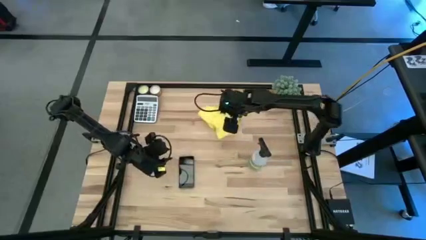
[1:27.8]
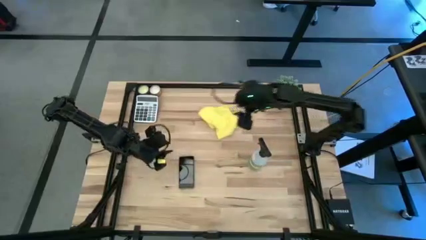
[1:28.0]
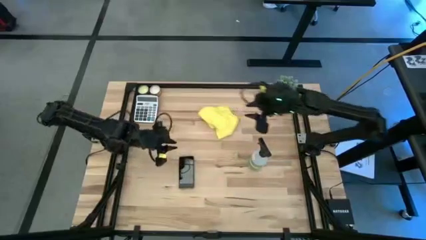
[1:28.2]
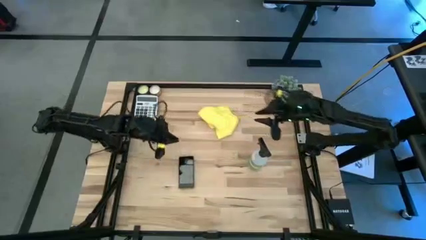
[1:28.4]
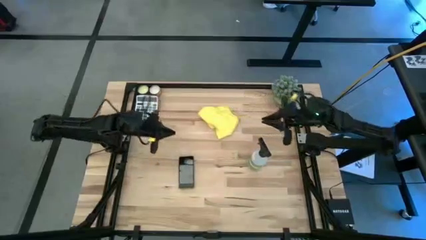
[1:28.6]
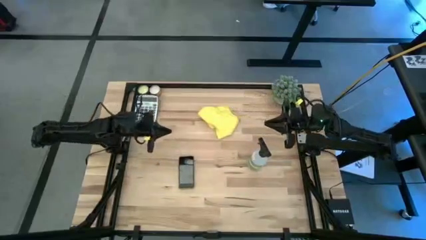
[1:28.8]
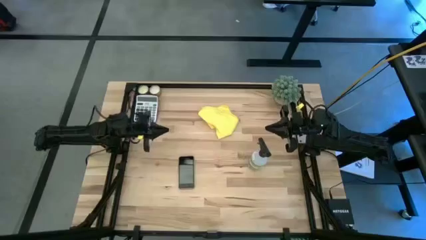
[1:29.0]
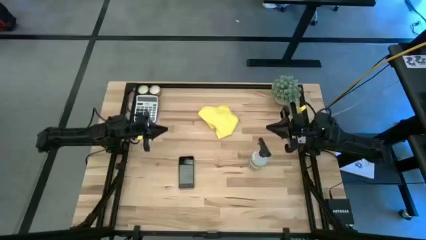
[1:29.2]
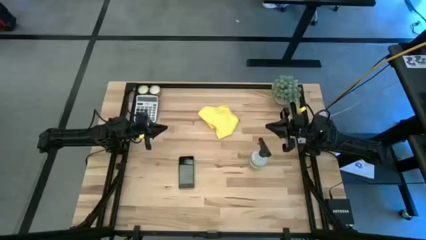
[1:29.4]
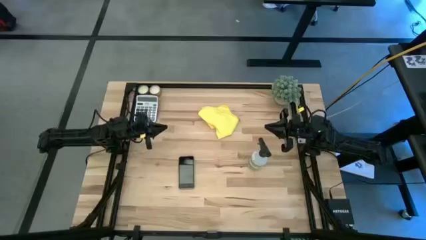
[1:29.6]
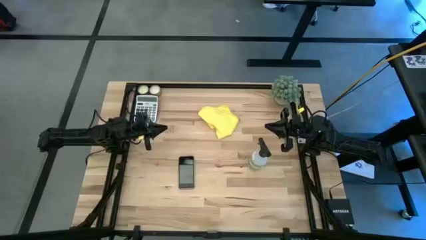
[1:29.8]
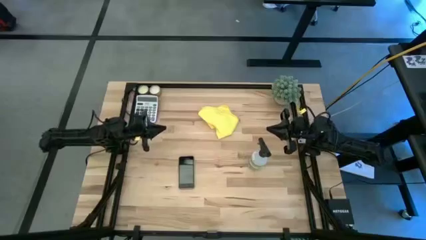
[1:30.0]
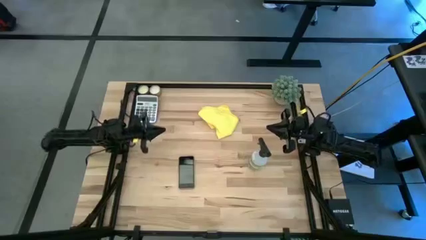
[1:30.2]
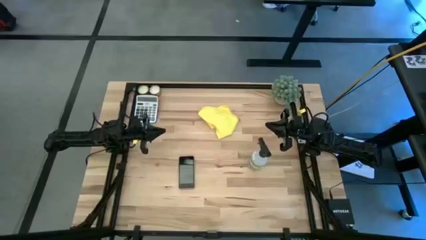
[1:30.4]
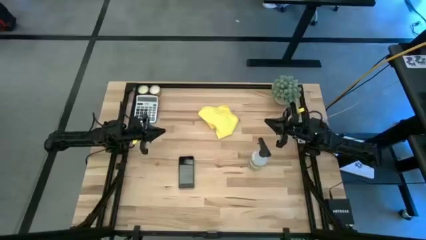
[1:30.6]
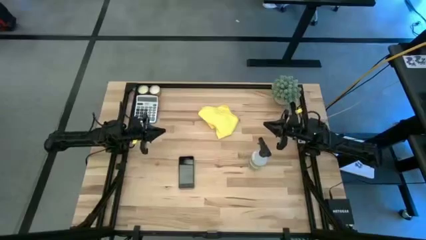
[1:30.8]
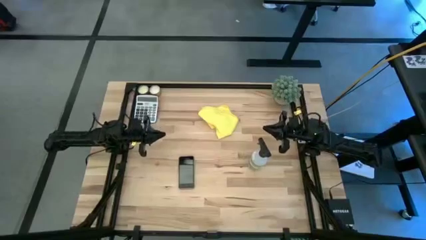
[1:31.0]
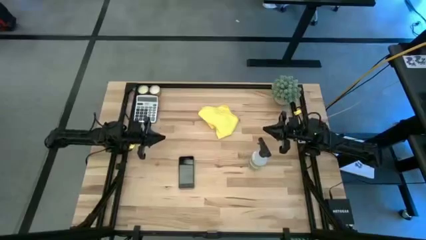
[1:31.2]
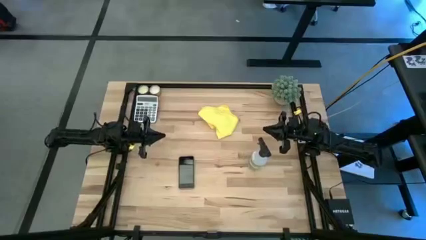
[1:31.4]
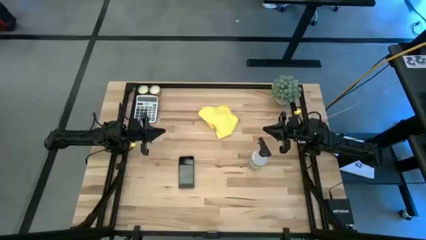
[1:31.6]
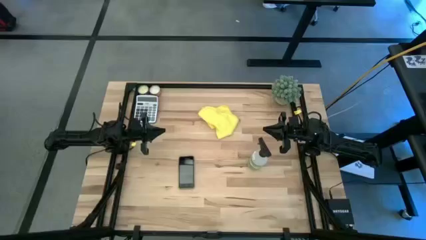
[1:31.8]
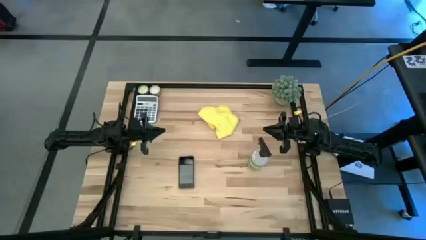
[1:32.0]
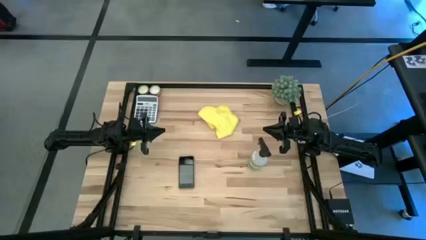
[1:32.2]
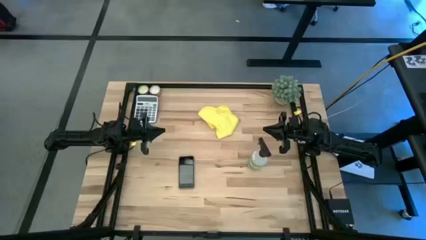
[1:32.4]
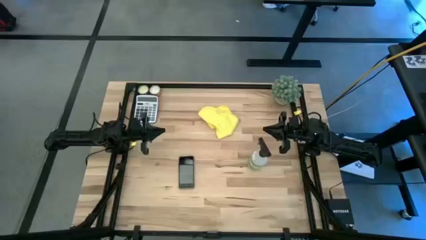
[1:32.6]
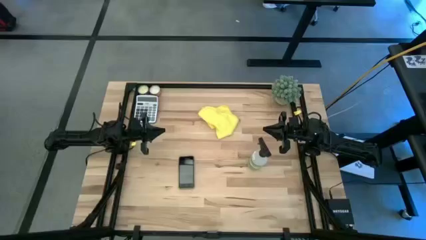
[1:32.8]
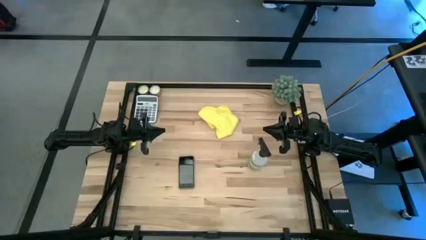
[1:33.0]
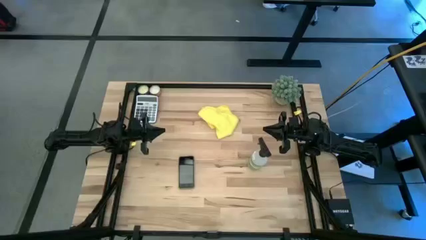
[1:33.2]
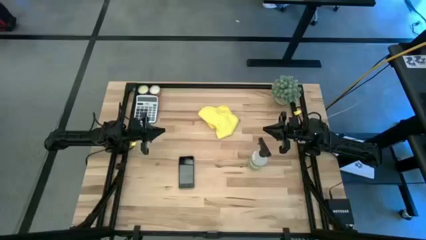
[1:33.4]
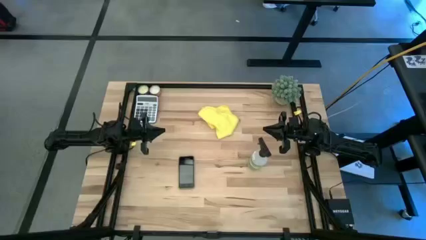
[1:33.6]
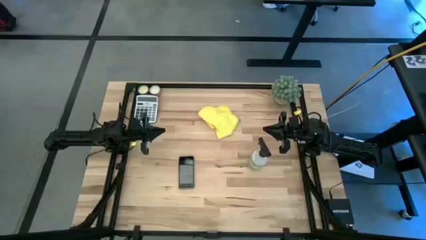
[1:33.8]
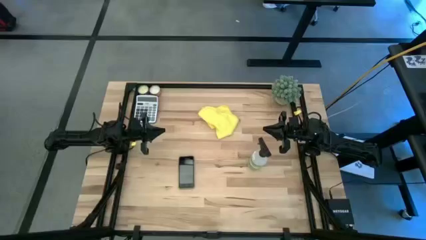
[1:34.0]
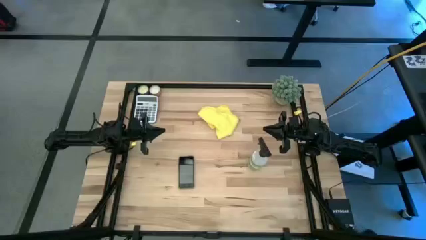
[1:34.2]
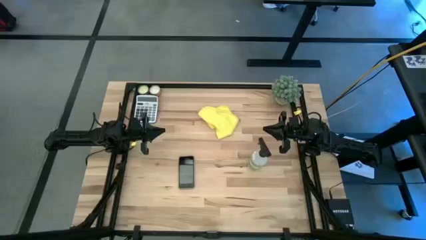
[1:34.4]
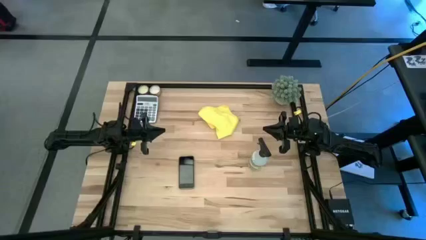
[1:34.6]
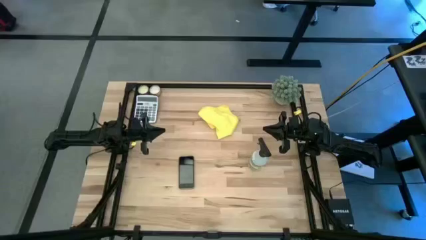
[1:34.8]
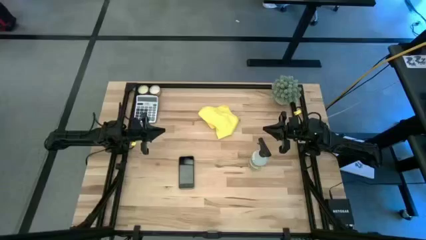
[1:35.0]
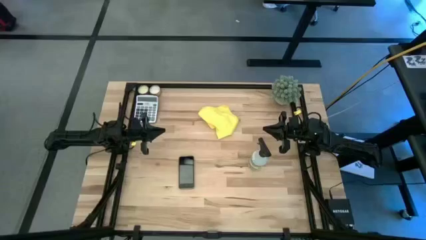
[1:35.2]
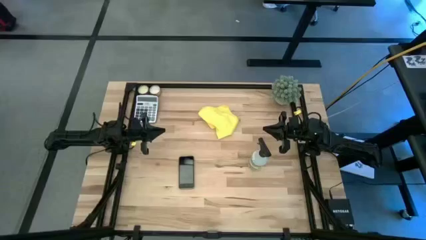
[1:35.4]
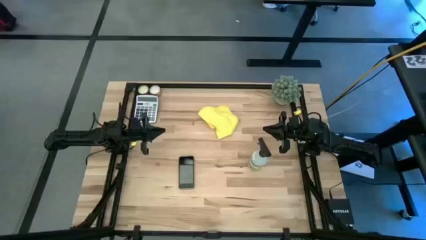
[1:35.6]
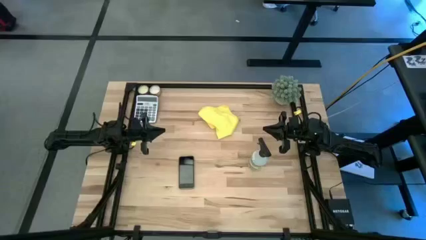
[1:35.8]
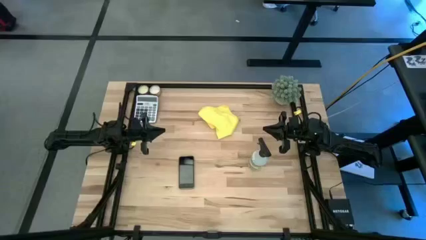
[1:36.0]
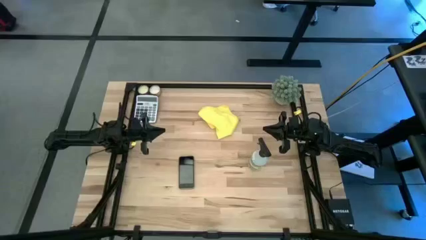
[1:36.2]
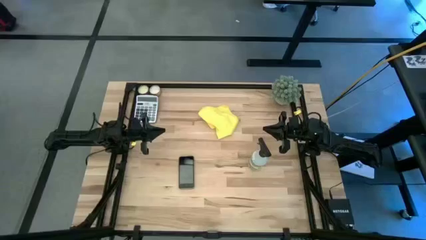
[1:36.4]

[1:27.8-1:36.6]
Task: Apply microfiber cloth
Return to Home Position

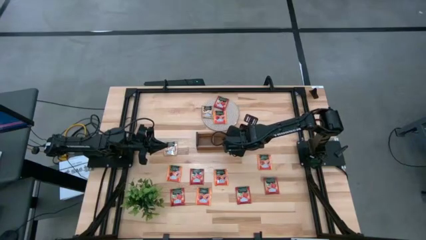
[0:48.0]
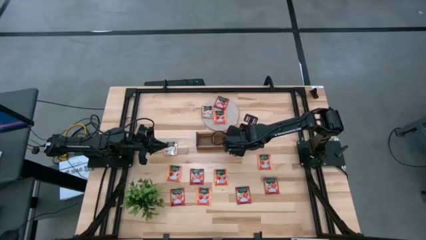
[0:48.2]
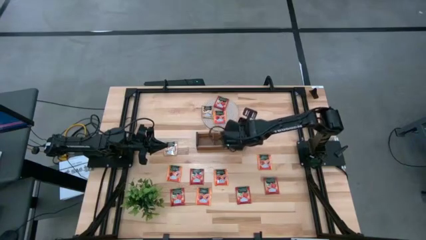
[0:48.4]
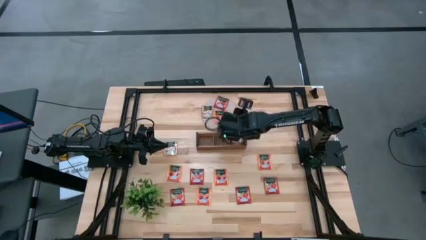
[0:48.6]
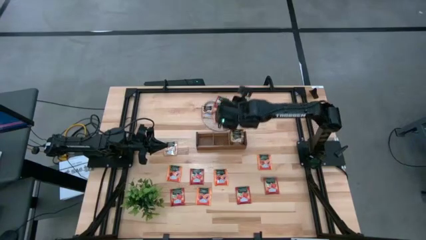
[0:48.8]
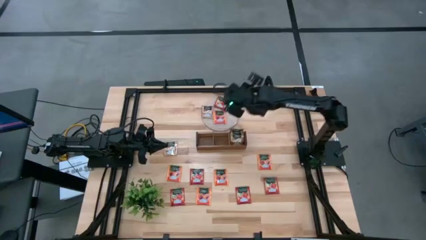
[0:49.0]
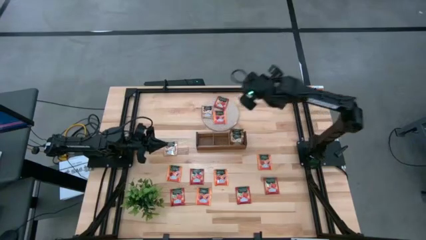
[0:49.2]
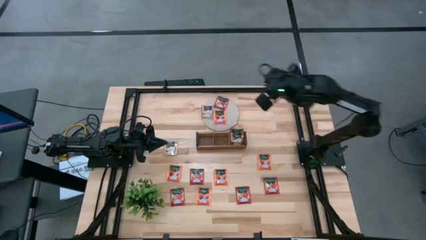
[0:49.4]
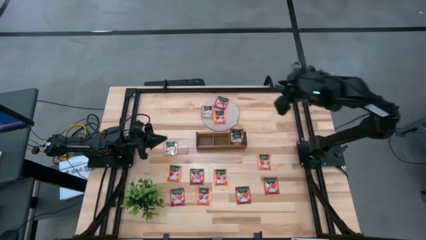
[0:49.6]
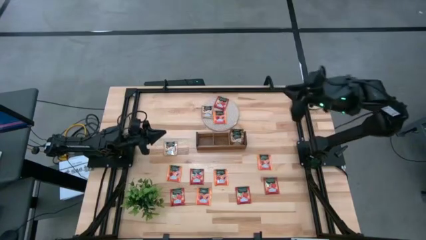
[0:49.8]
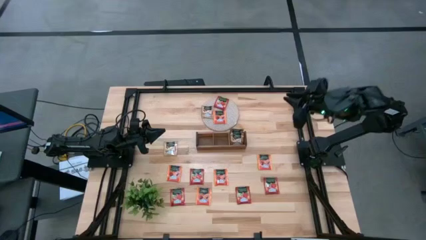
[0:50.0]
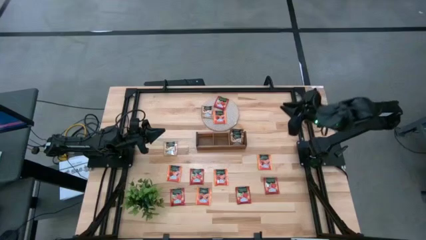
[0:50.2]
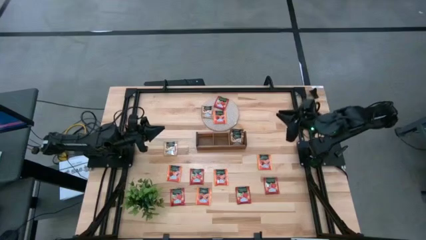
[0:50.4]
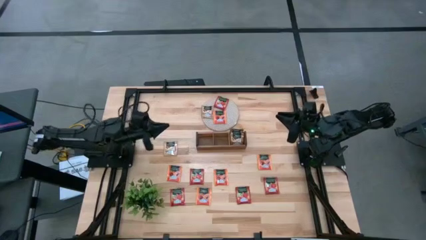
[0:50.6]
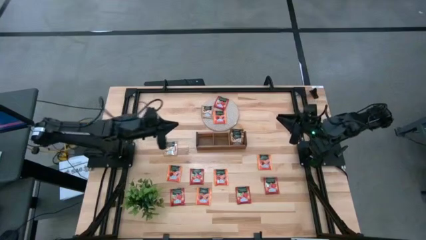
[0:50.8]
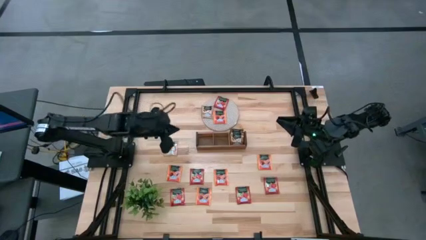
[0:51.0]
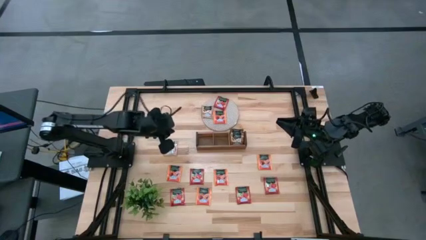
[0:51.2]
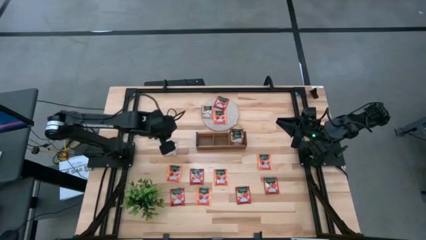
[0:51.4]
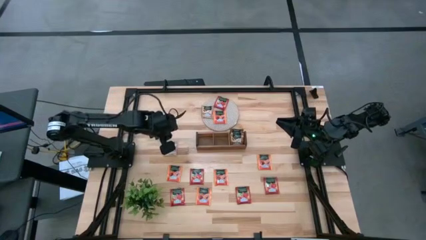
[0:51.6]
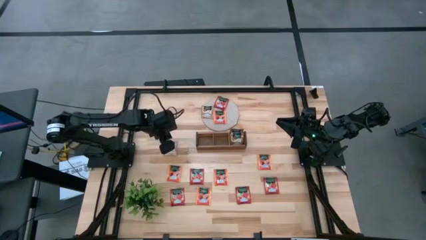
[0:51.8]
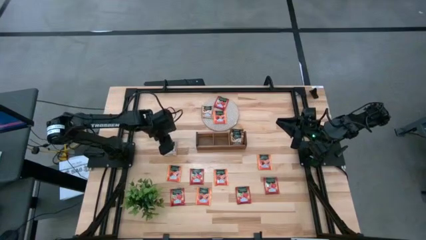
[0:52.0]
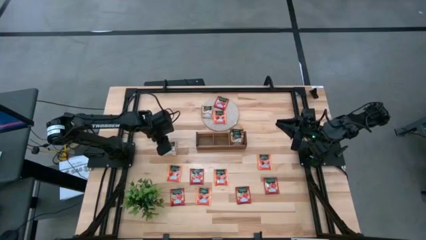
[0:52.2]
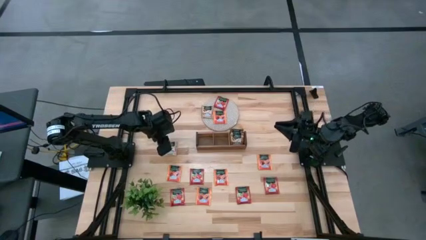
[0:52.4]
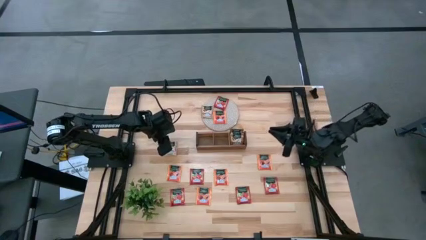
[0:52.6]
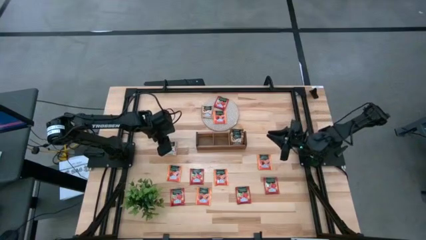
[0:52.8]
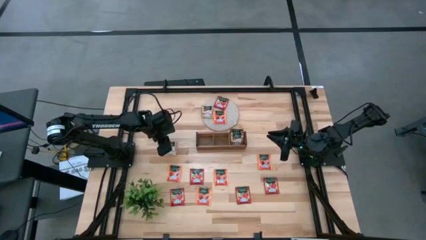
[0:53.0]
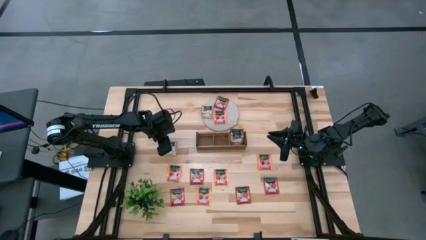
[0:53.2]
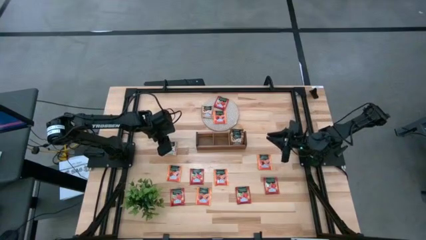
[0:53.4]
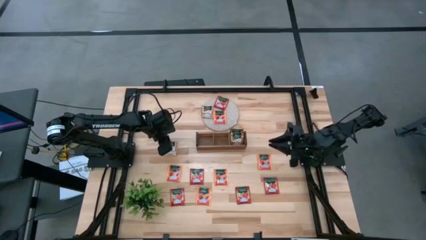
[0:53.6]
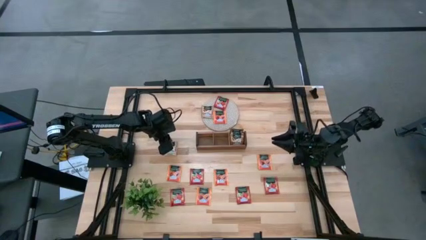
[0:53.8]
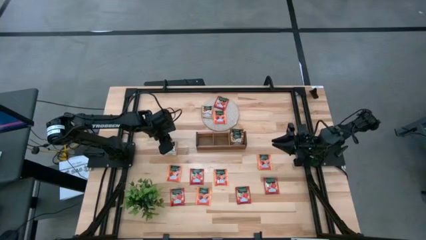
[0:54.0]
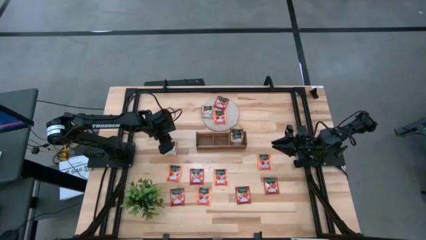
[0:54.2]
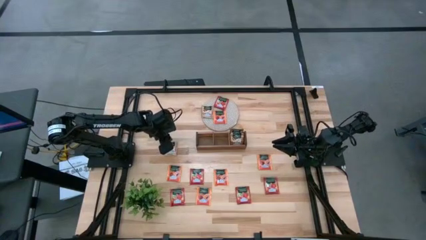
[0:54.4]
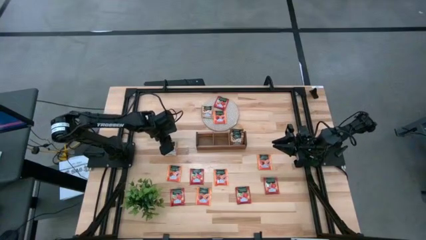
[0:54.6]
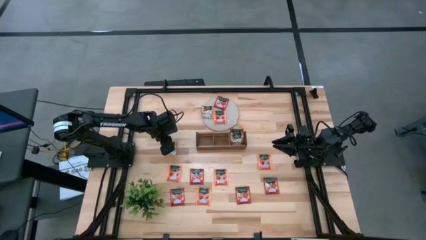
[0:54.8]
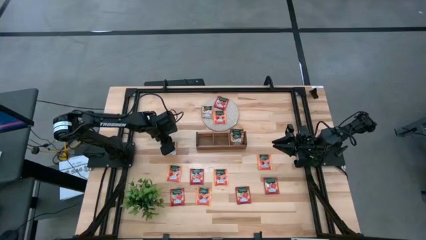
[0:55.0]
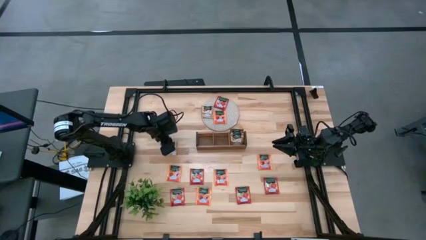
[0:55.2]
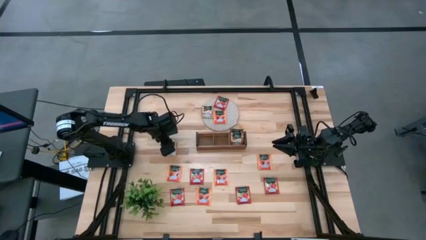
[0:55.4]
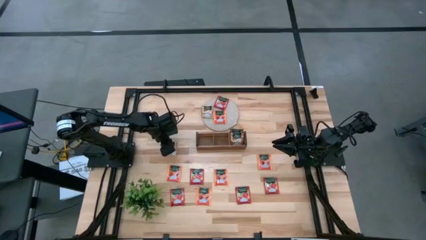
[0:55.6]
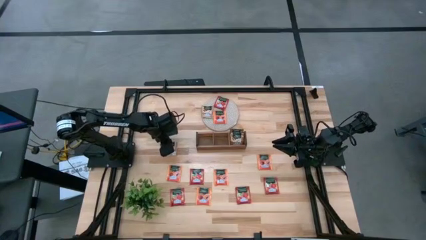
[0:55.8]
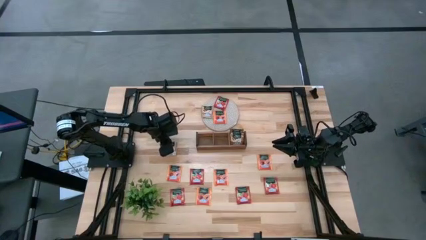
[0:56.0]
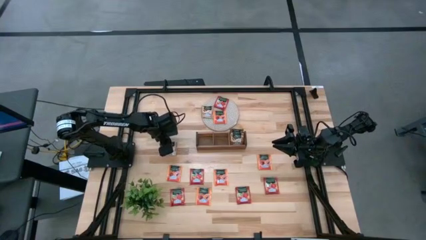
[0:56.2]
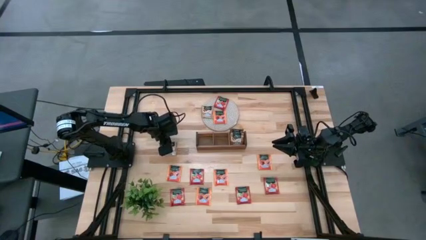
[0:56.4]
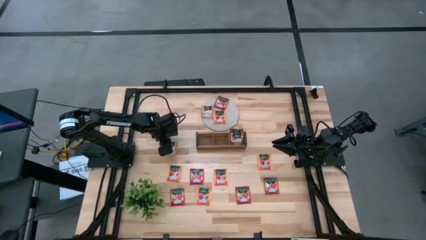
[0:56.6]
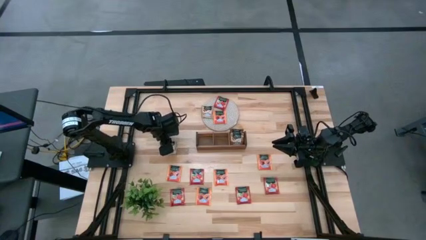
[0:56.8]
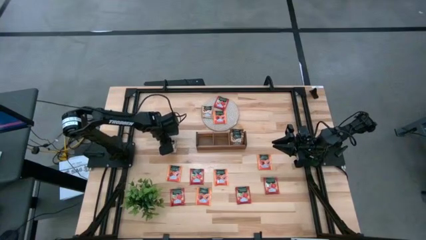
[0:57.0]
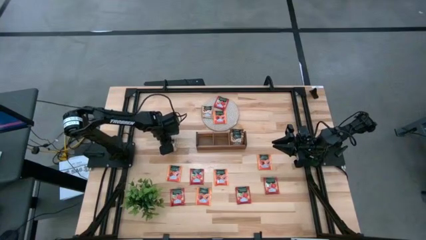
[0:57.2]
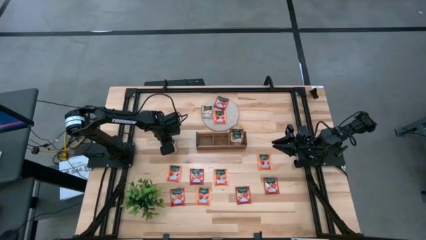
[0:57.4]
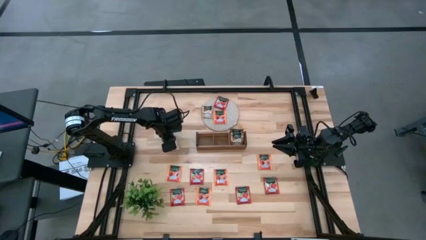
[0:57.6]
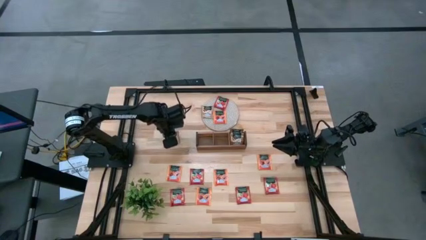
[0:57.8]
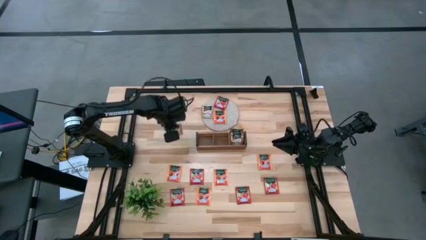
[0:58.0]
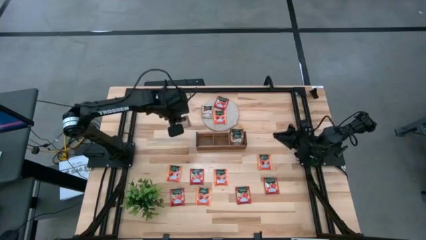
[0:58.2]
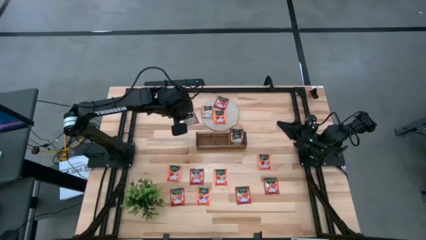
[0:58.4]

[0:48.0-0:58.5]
Task: Pick & Place Tea
Put the brown tea bag into the right section of the wooden organizer
